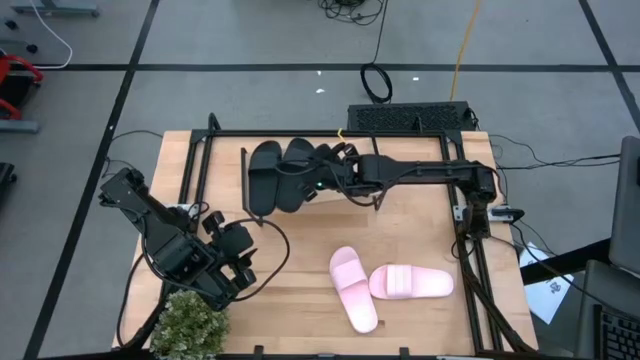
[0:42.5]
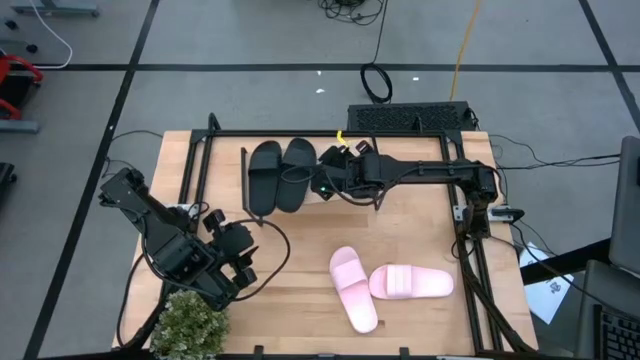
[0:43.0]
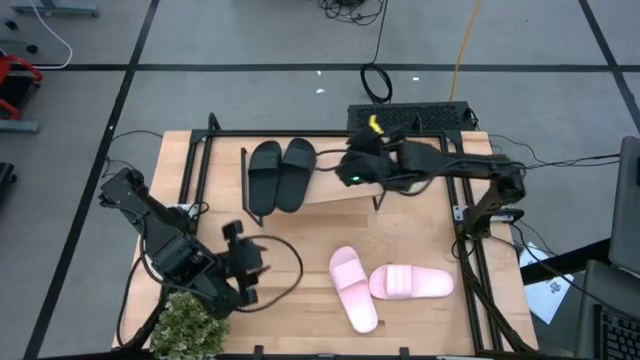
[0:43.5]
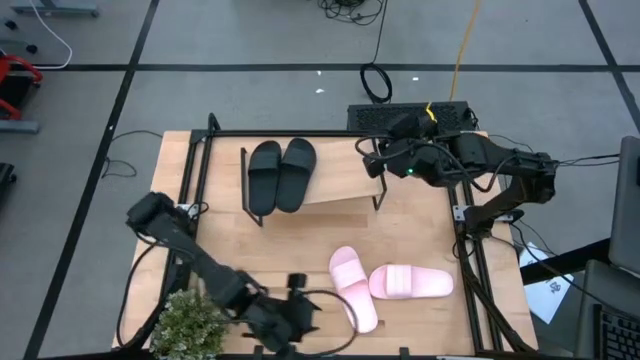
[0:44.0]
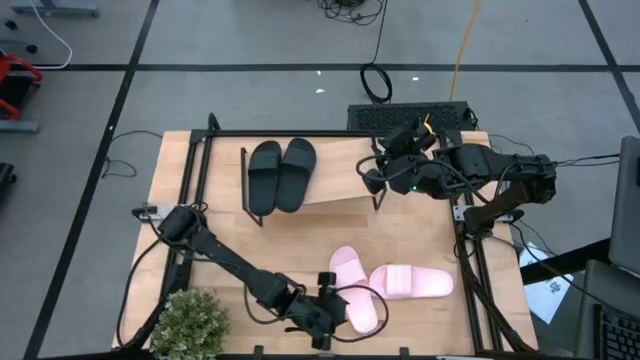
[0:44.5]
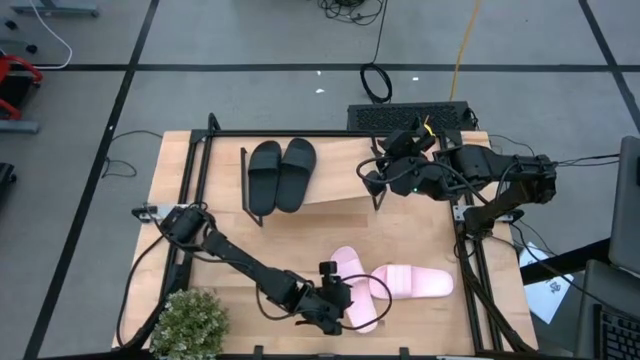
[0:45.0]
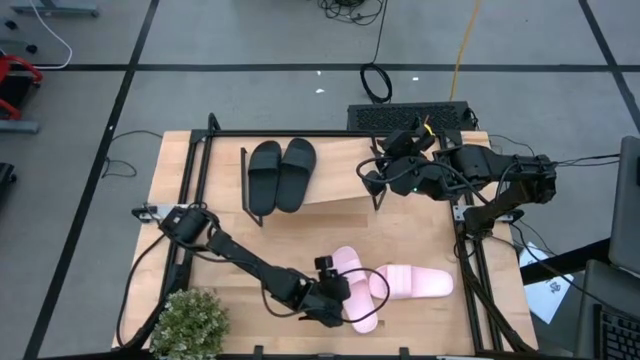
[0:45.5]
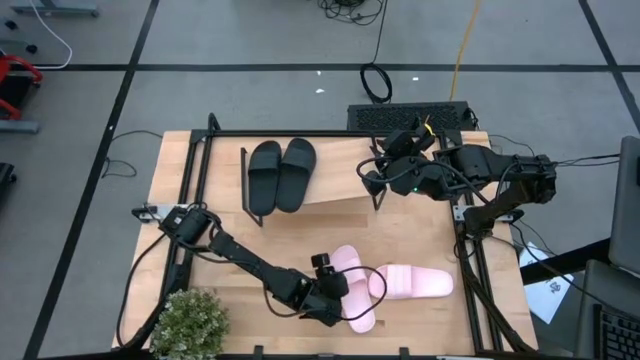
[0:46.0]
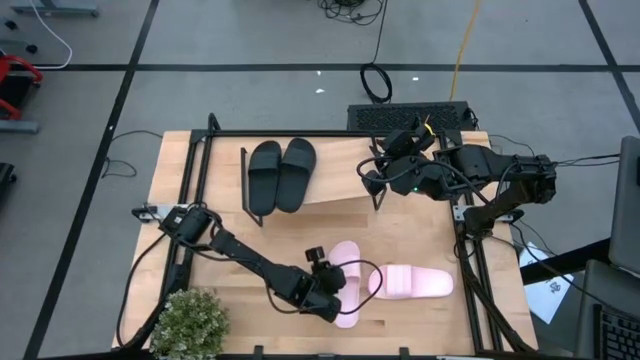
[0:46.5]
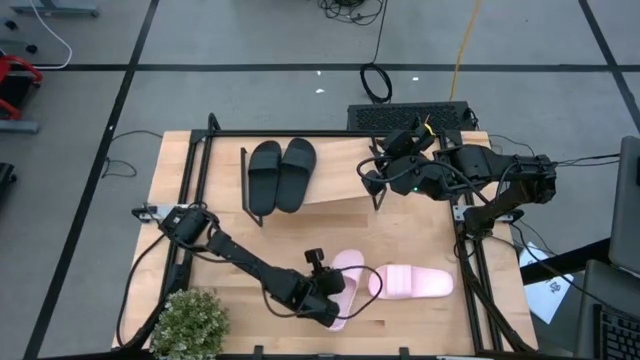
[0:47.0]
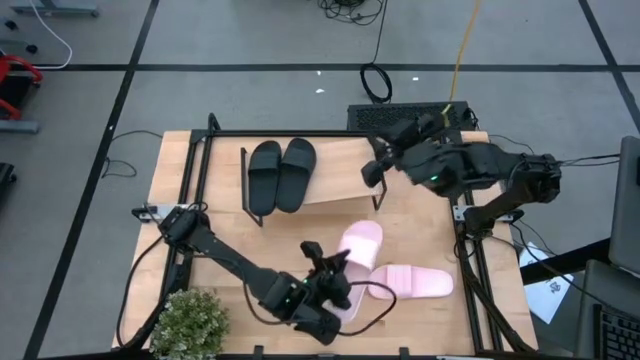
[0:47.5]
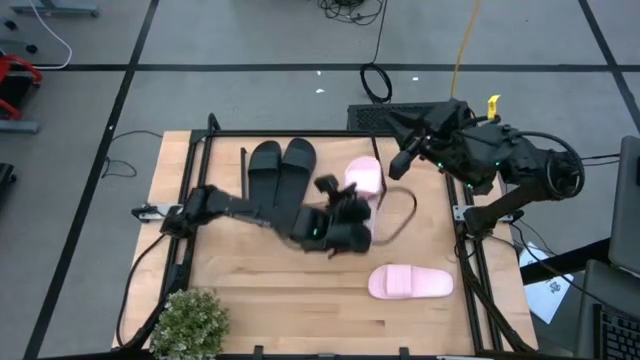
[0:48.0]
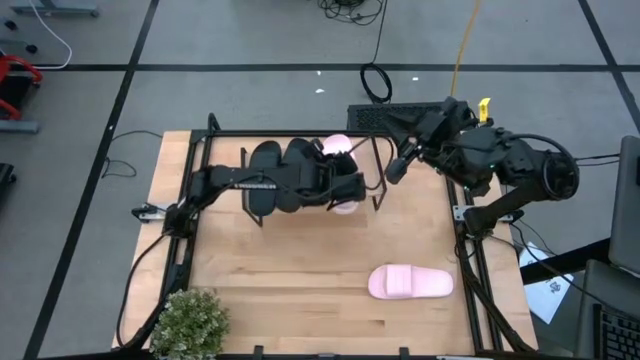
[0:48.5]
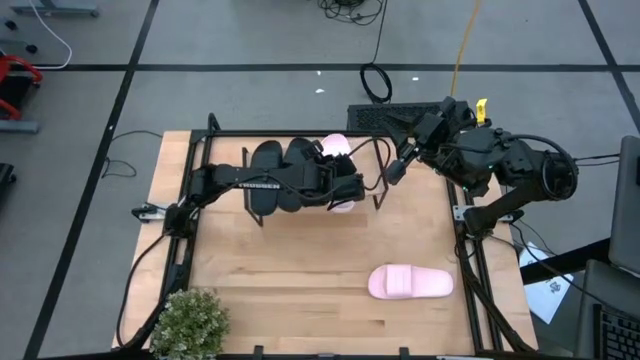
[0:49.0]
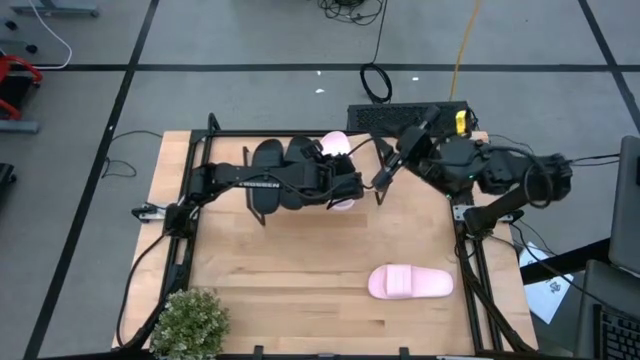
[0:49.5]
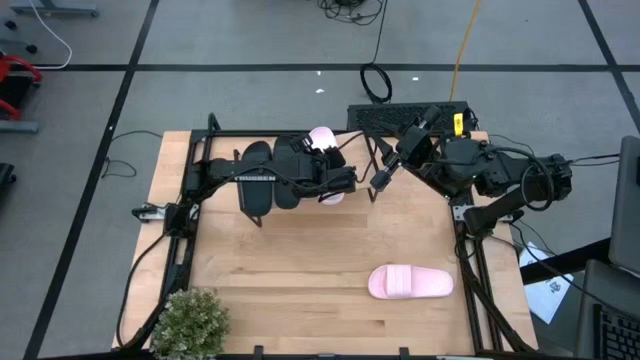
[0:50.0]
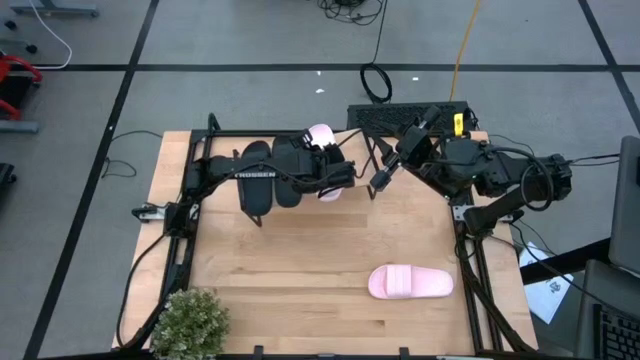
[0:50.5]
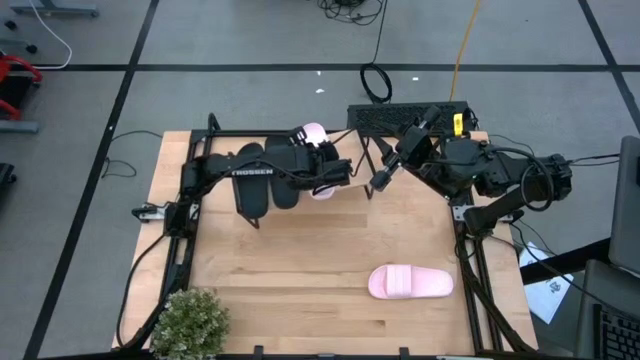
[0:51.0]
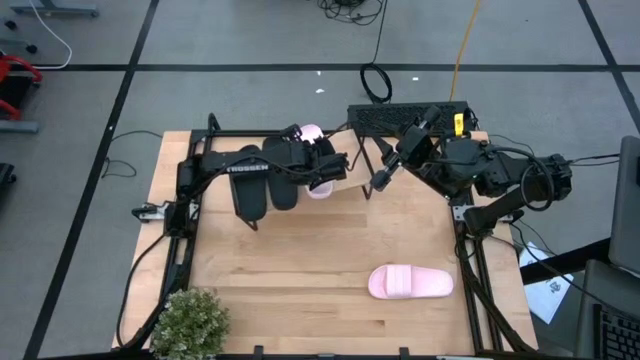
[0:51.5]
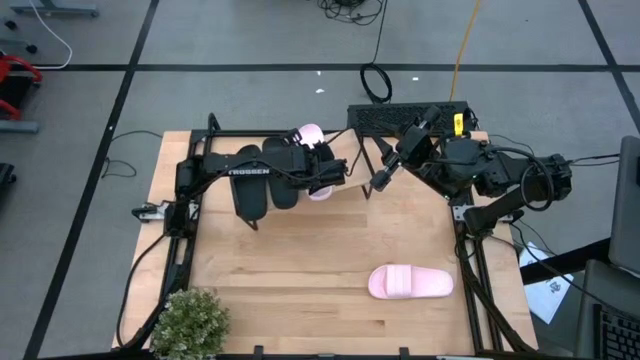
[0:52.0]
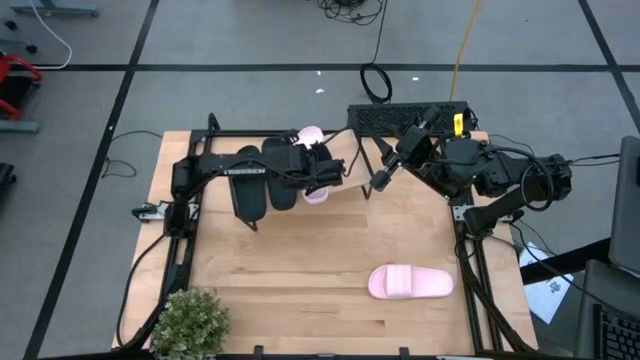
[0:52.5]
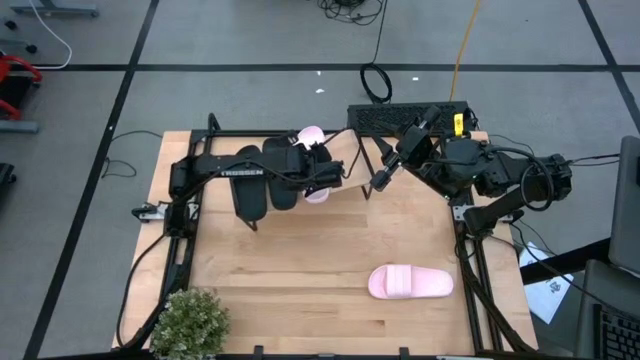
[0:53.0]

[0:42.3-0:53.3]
Task: Pick and place slides into the shelf
Put the left slide on the shelf
